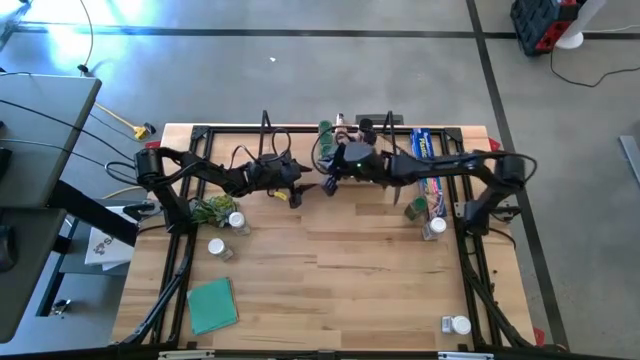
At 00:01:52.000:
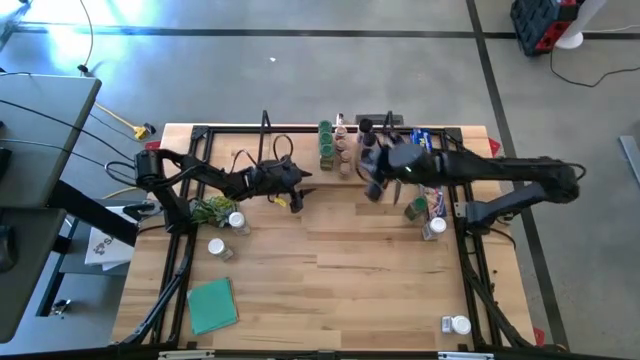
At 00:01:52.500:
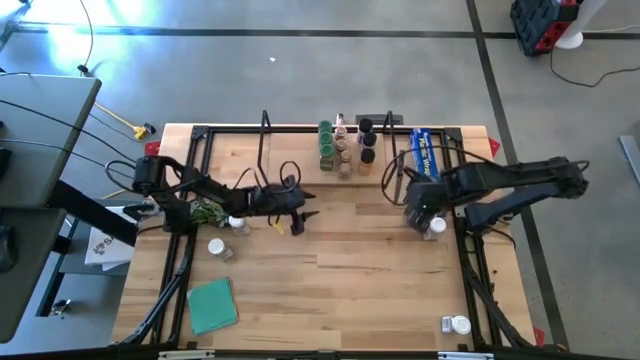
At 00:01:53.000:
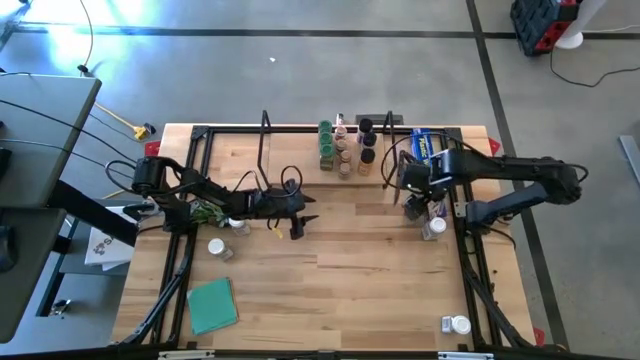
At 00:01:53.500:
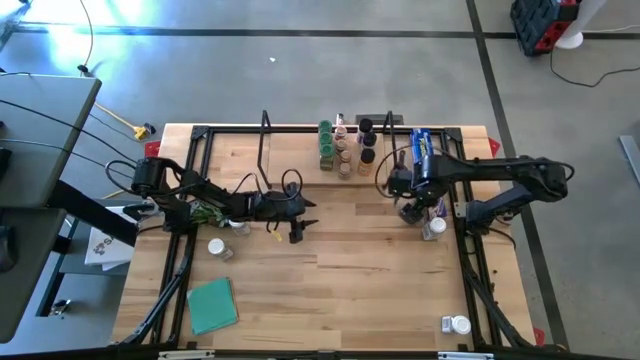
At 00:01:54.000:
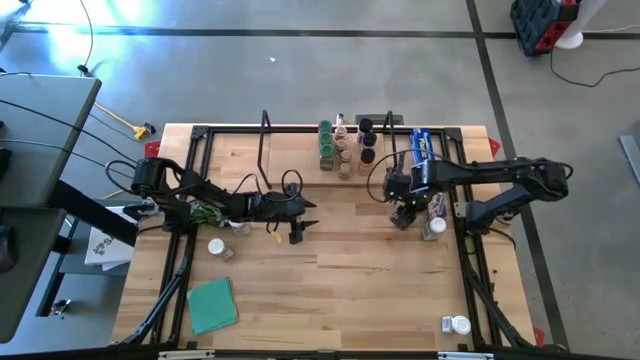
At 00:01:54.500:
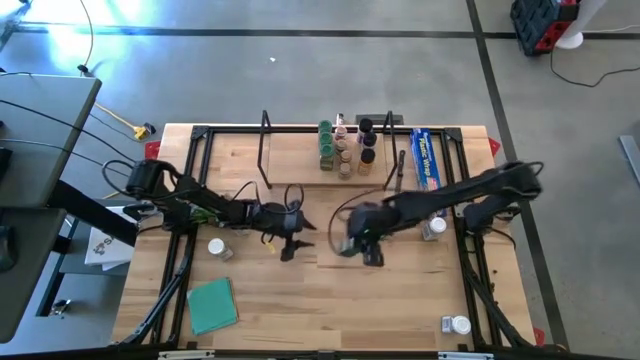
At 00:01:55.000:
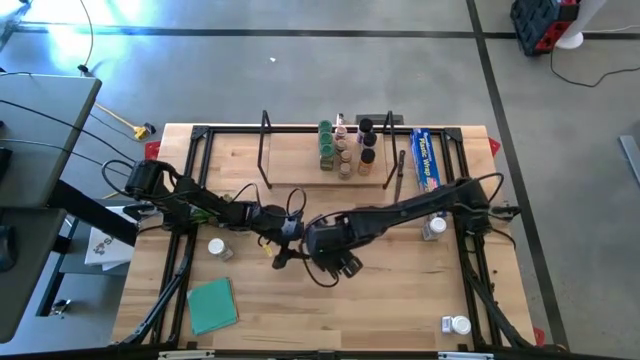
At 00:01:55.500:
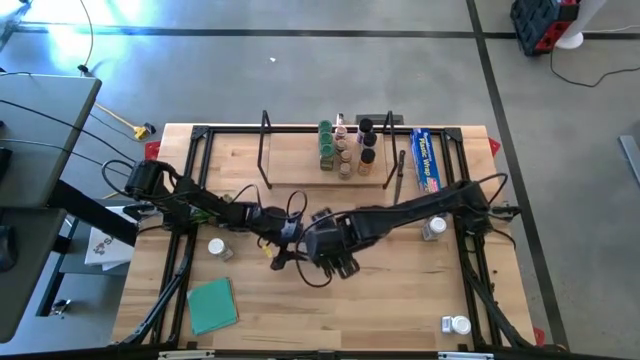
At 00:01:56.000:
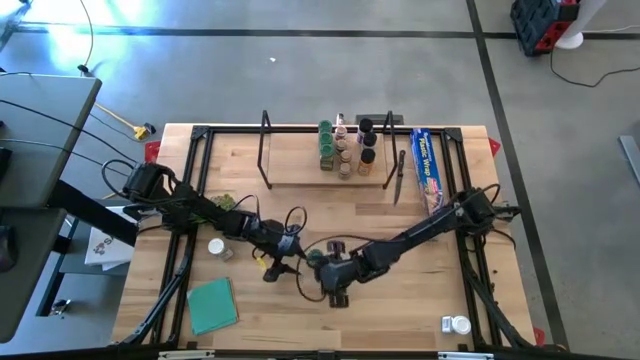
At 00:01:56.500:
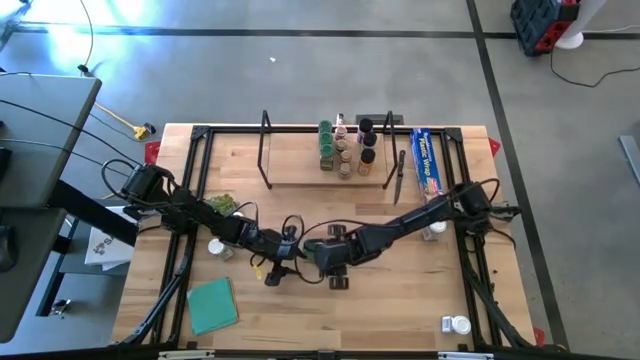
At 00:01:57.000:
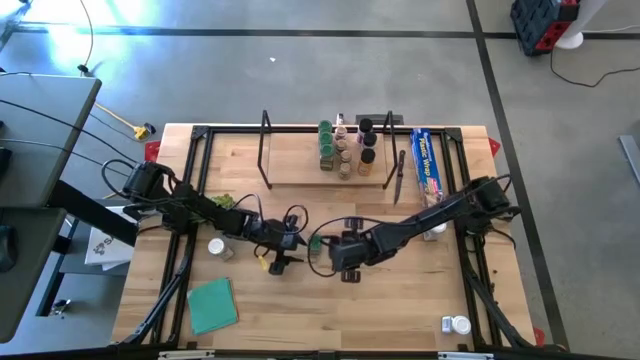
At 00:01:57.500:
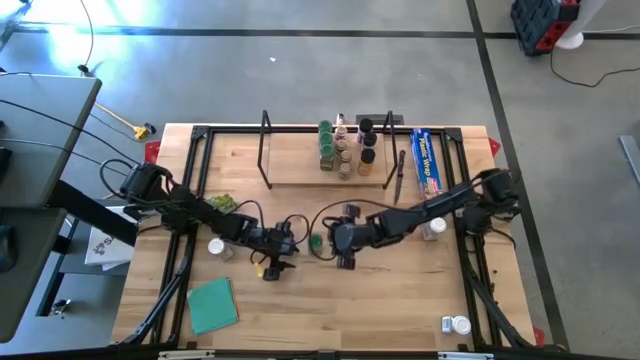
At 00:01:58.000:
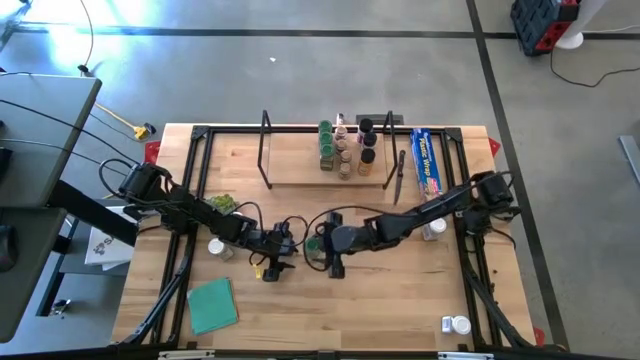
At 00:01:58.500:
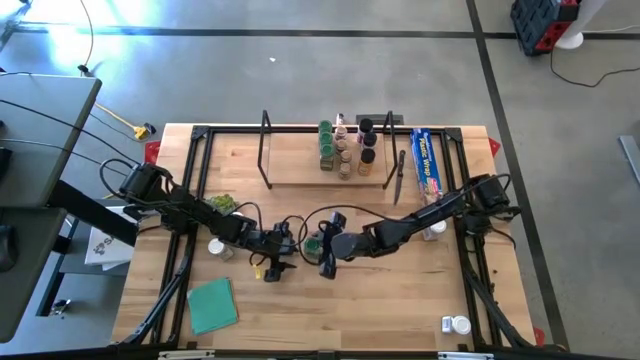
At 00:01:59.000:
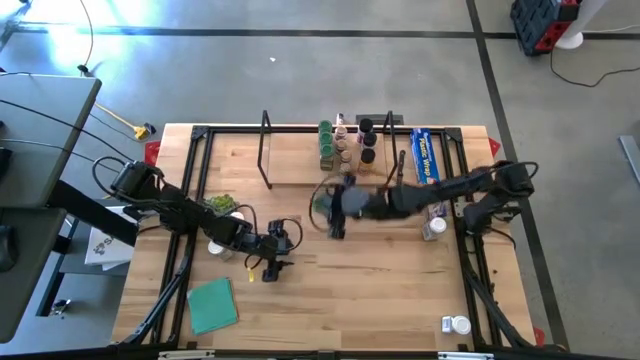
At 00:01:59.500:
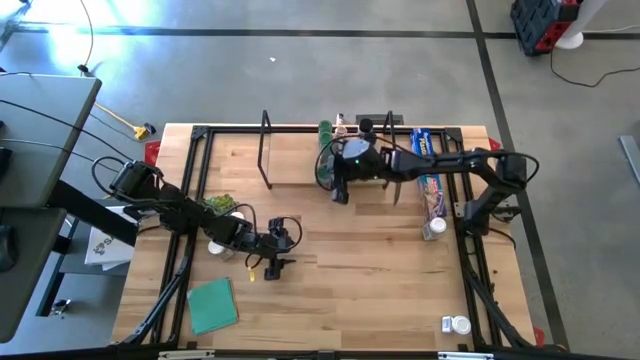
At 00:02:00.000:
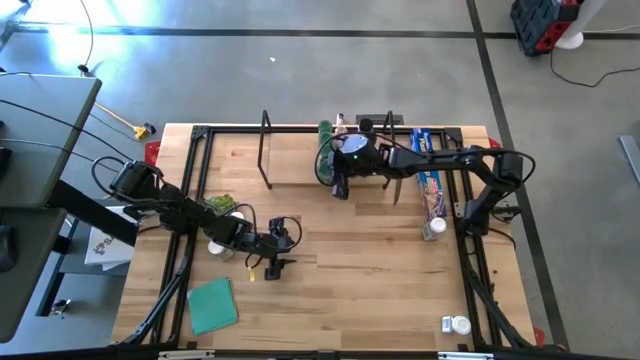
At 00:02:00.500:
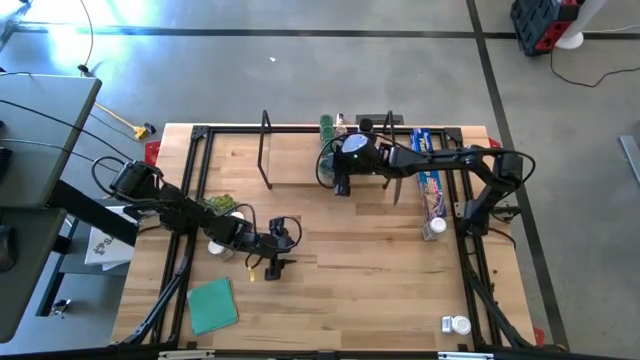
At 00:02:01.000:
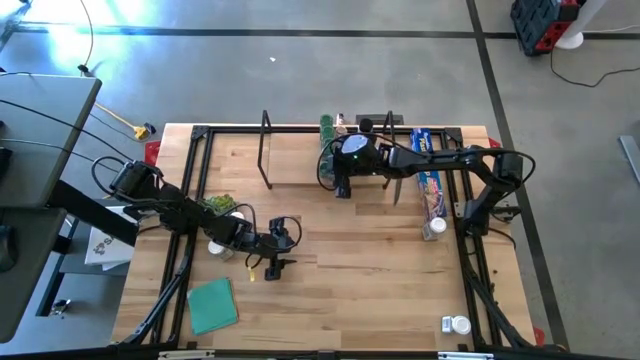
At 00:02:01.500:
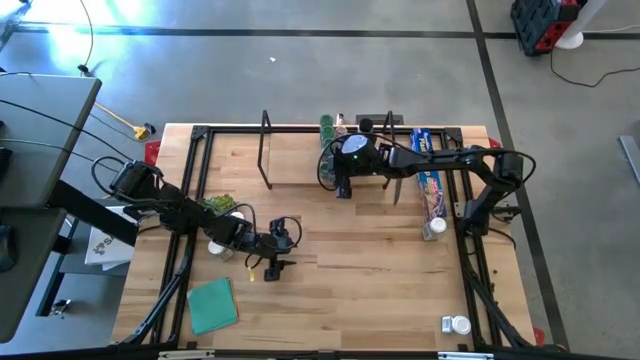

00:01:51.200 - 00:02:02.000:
Task: Shelf spices
Put the green seasoning bottle on the shelf align with the other green seasoning bottle

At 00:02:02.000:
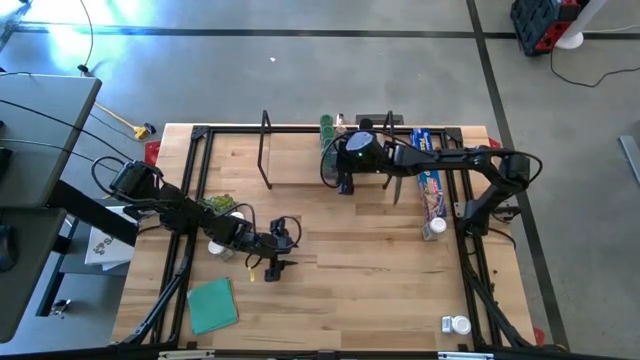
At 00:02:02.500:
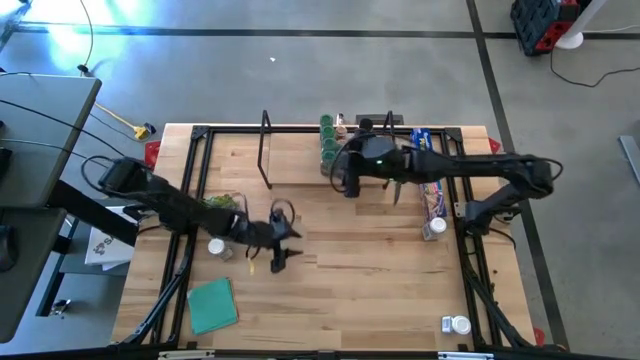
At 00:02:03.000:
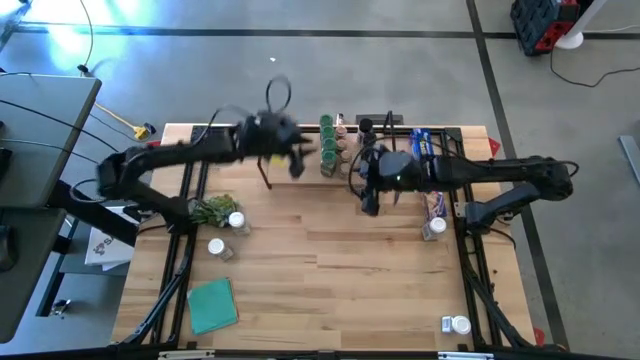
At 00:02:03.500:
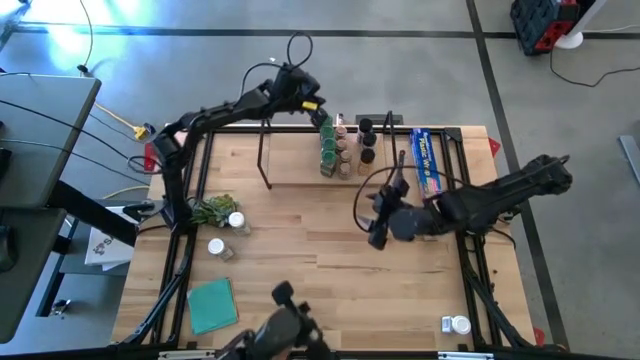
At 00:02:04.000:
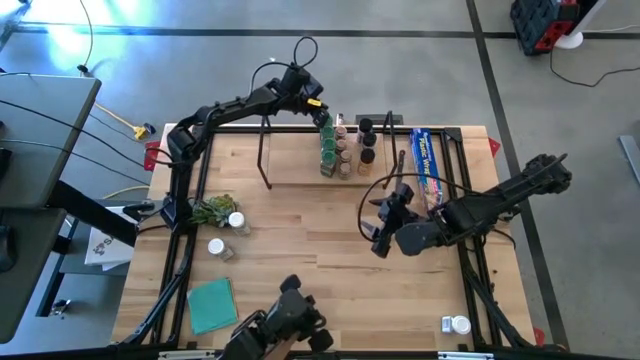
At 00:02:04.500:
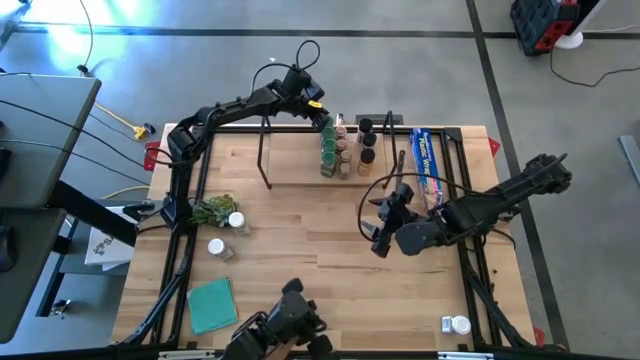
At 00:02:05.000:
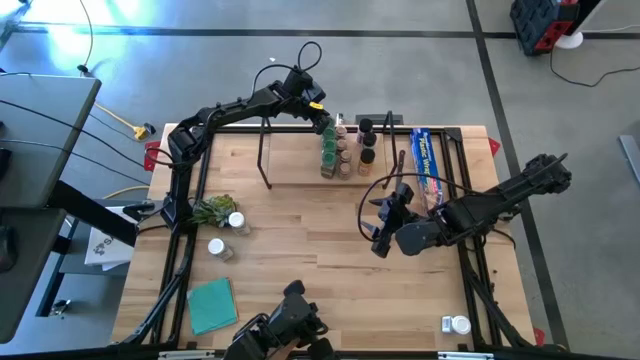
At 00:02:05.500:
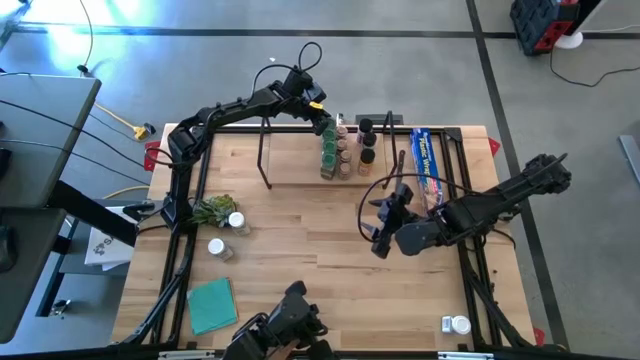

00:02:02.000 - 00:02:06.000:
Adjust the green seasoning bottle on the shelf

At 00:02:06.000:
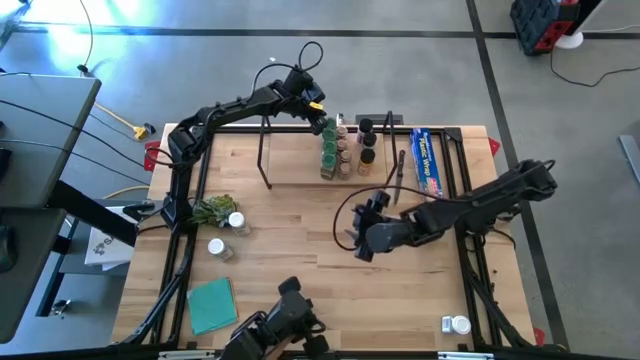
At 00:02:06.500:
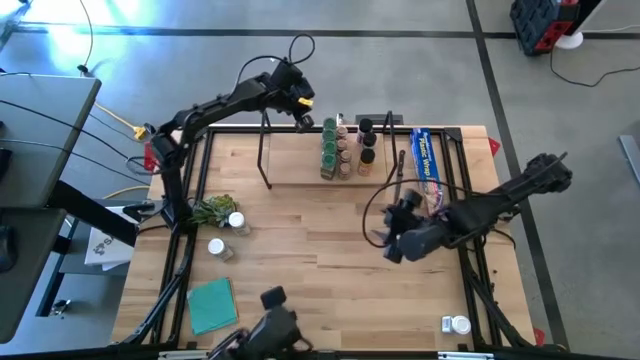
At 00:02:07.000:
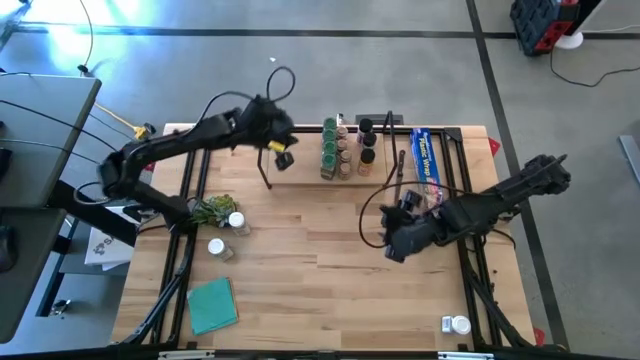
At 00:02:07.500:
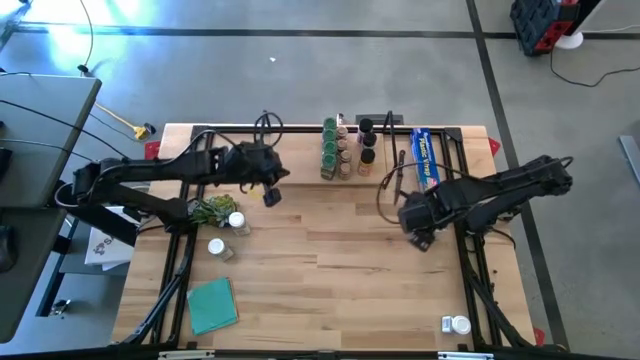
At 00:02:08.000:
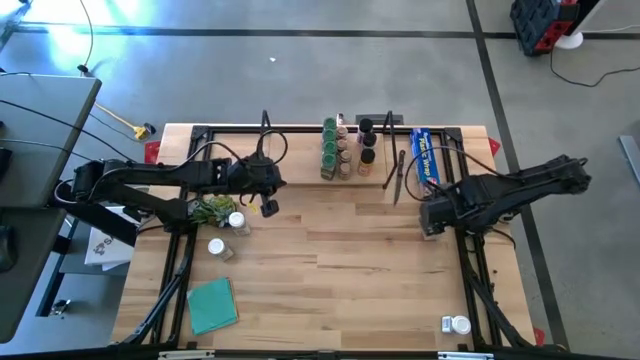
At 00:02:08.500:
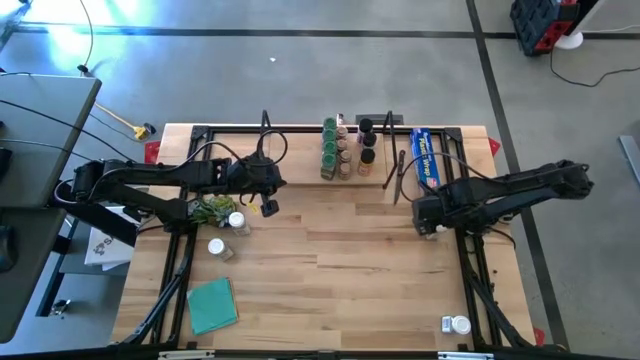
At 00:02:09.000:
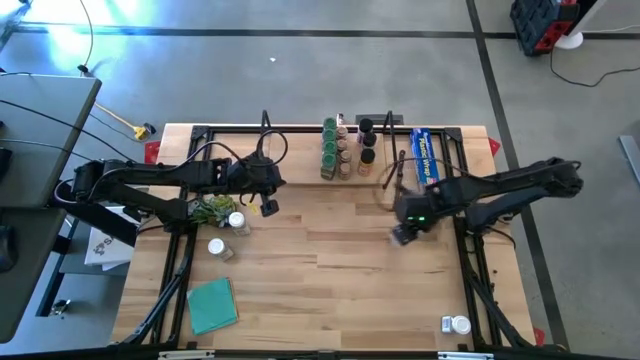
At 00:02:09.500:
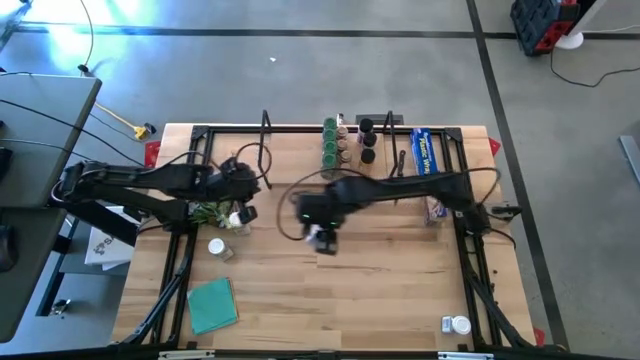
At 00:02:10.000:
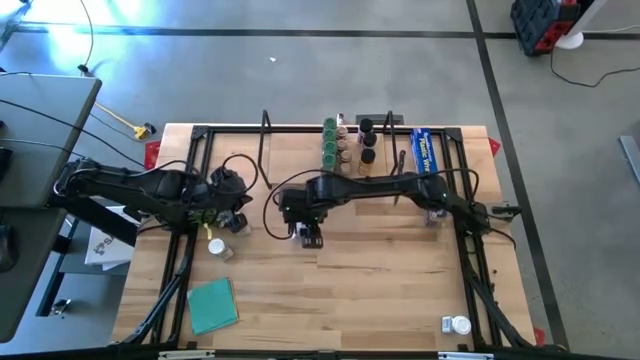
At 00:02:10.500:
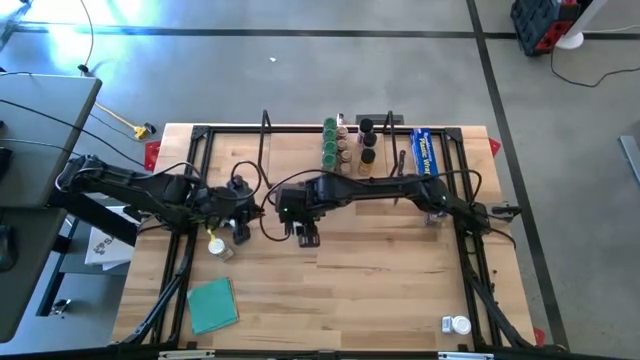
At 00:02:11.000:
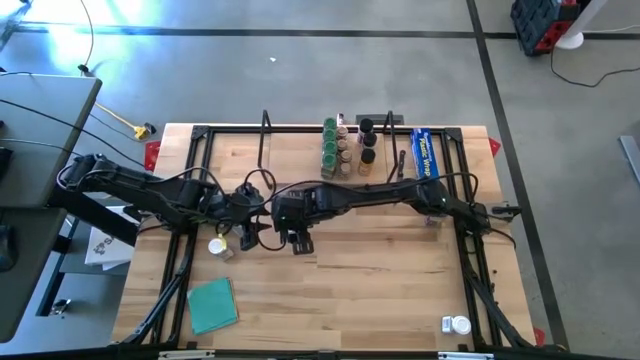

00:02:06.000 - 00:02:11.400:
Put the white seasoning bottle on the shelf

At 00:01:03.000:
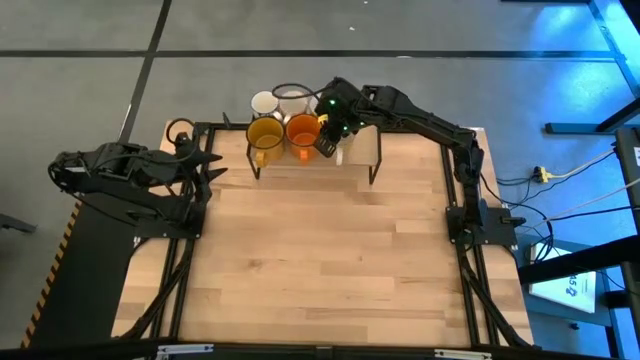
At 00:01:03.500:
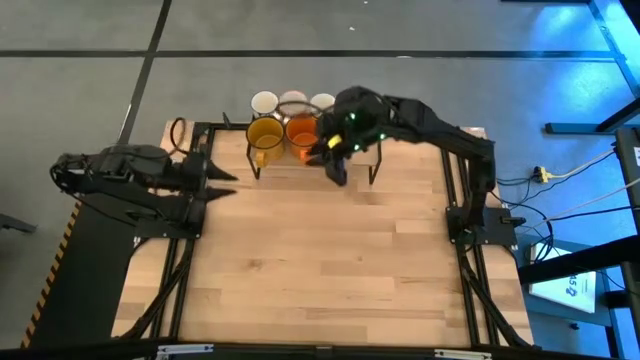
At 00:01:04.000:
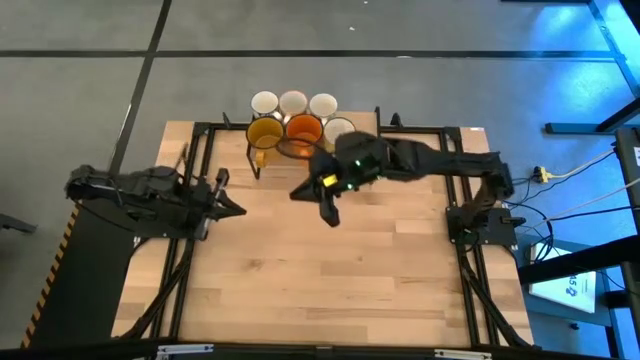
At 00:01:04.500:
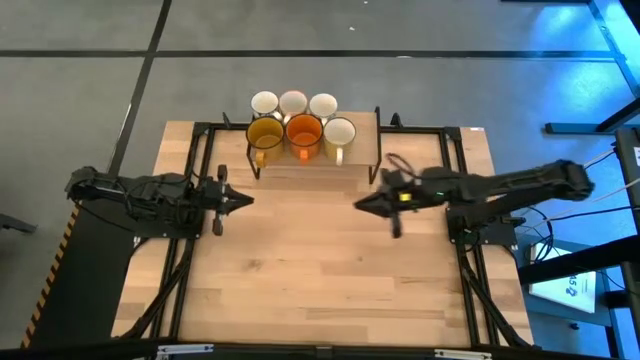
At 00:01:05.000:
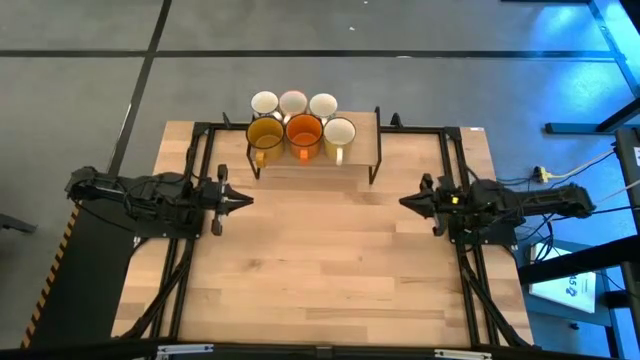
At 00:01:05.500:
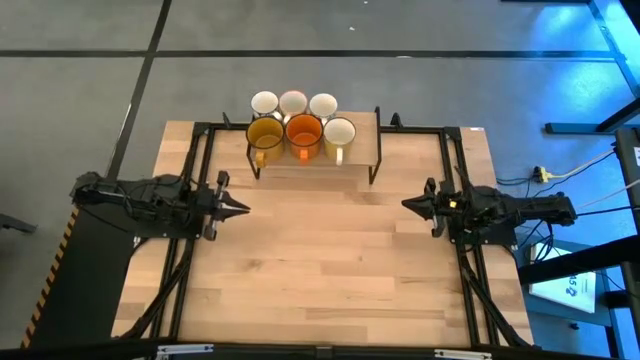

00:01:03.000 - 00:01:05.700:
Task: Place coffee mugs
Return to Home Position
